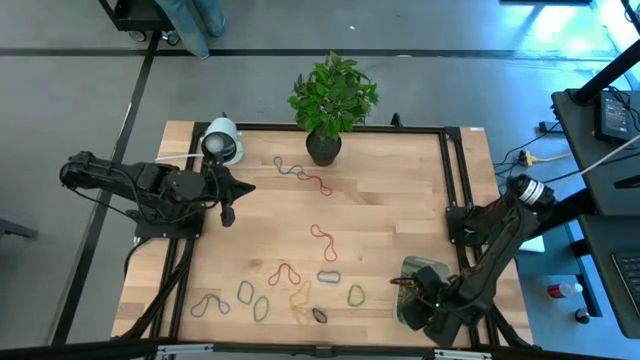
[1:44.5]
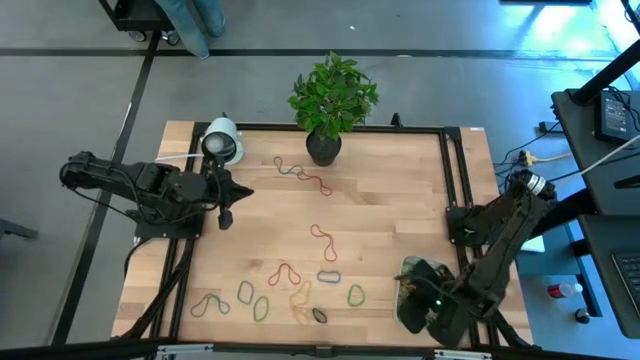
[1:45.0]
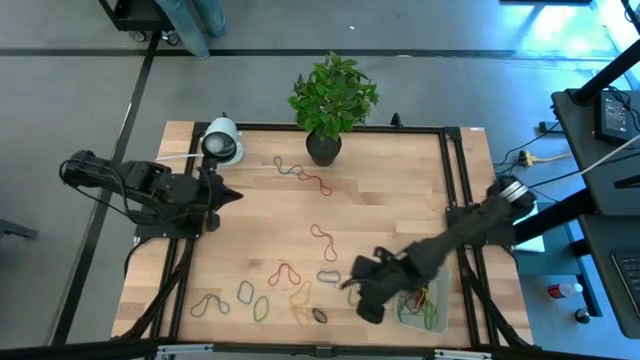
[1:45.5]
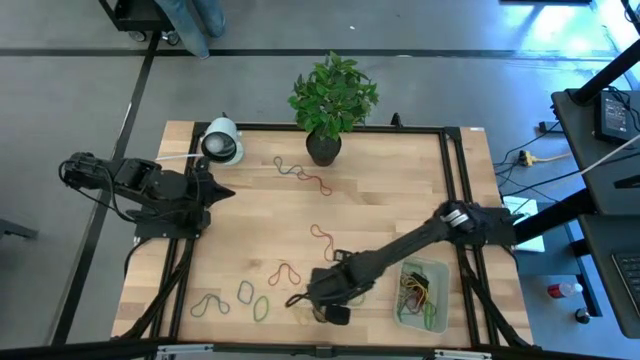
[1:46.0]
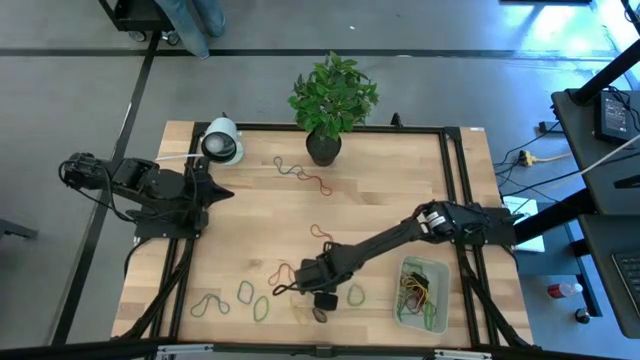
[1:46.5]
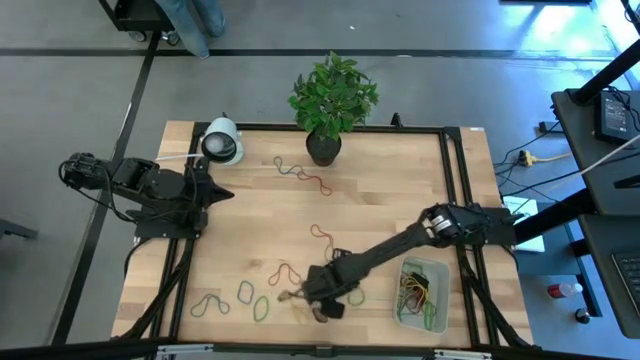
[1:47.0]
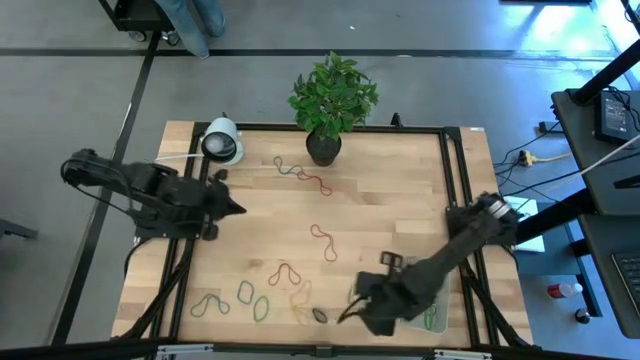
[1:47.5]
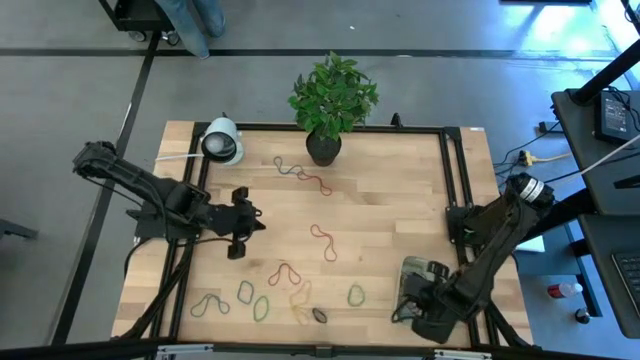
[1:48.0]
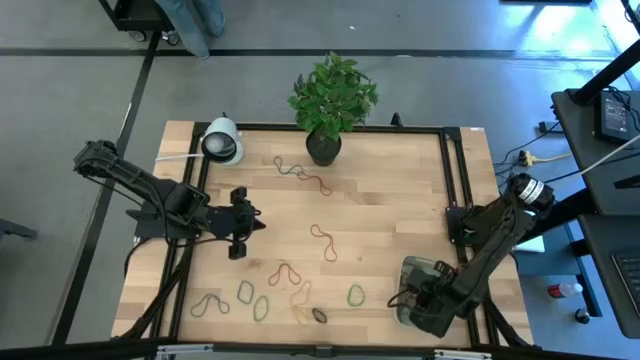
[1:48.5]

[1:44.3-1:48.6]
Task: Pick and place rubber bands into bin
Put the blue rubber band into the gray bin

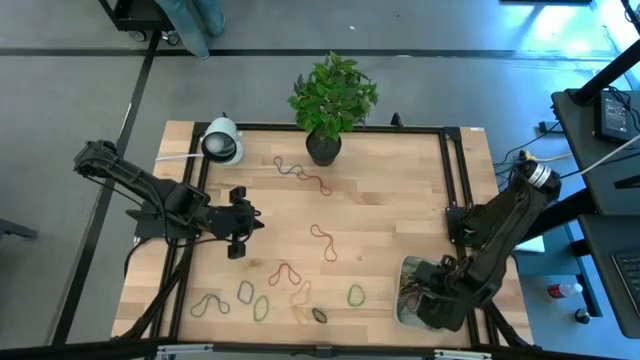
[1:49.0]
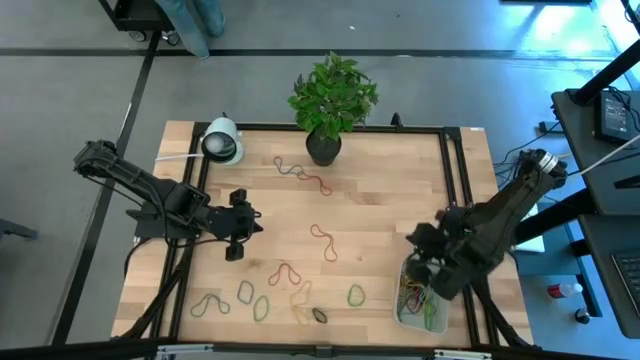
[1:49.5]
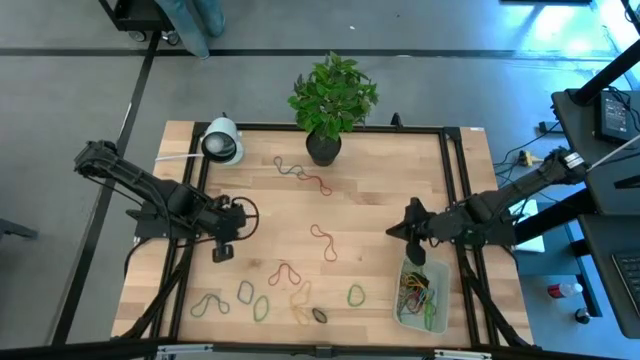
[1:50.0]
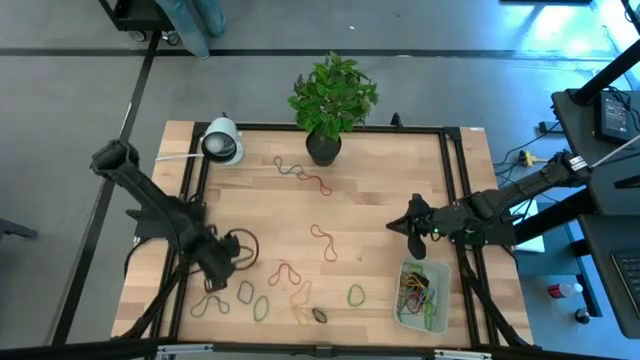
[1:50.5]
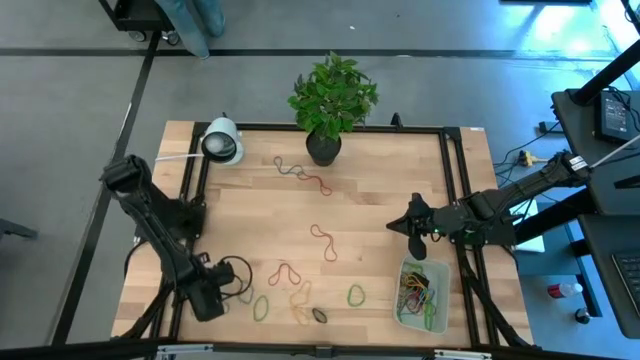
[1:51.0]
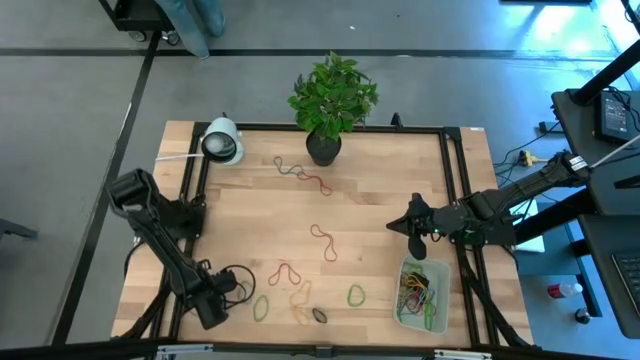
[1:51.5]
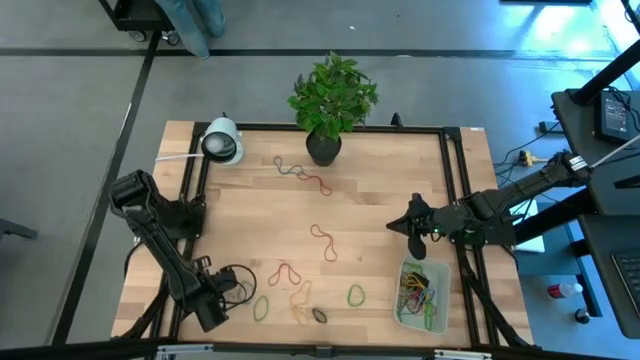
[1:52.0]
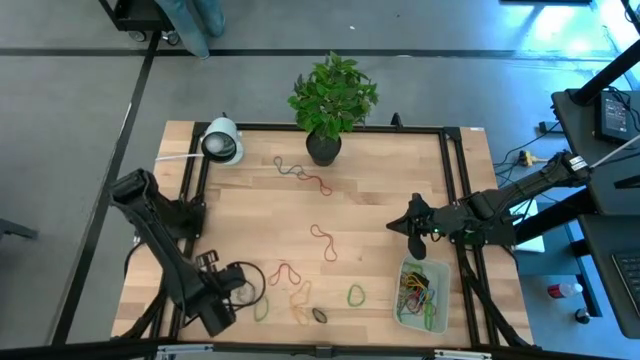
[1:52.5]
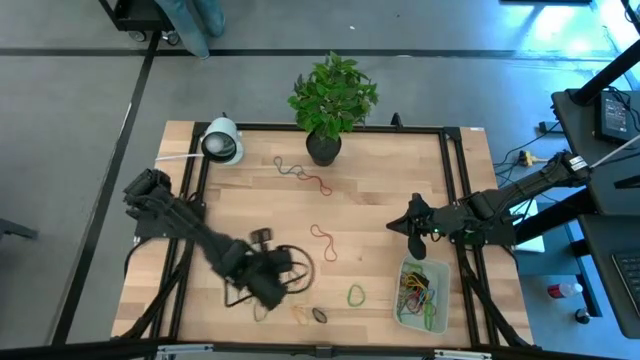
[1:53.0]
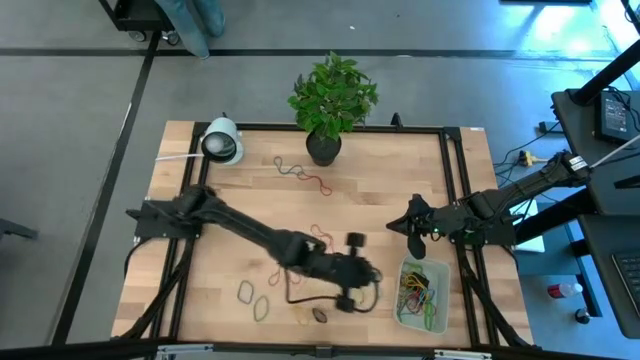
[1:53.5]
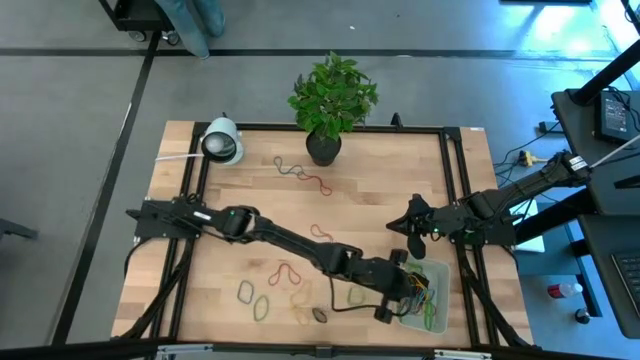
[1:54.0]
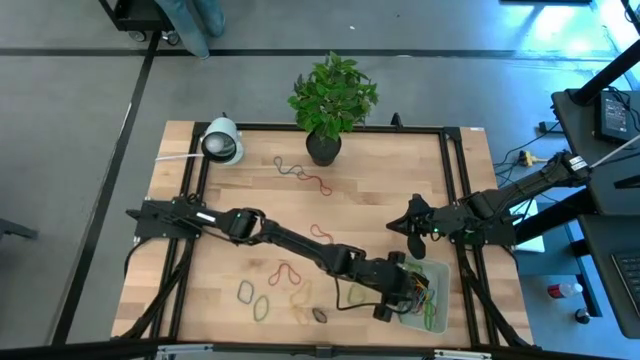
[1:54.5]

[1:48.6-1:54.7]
Put the blue rubber band into the gray bin

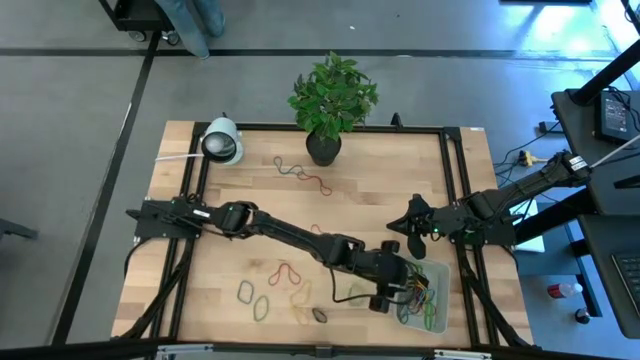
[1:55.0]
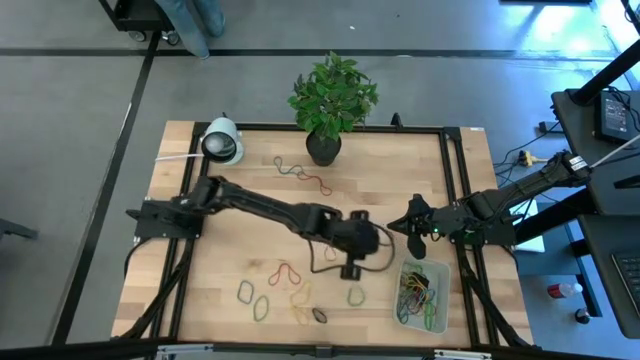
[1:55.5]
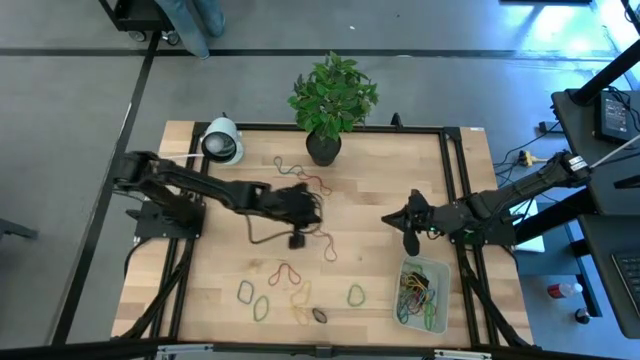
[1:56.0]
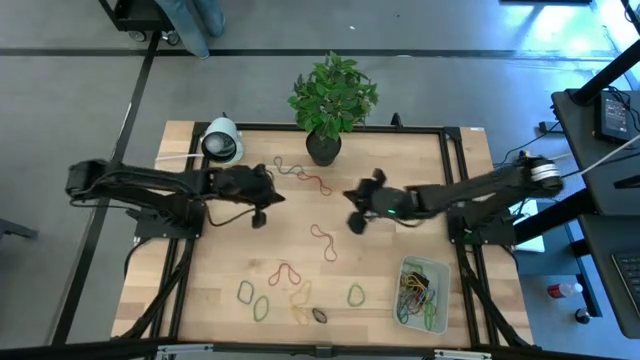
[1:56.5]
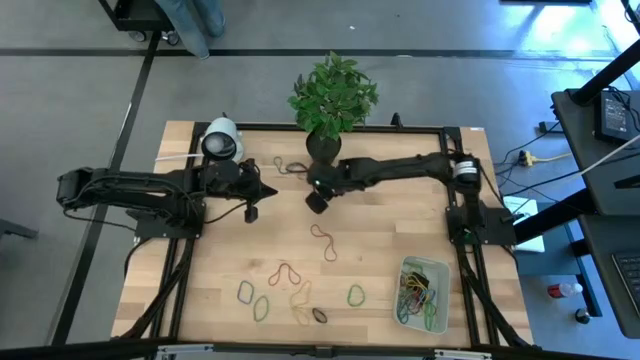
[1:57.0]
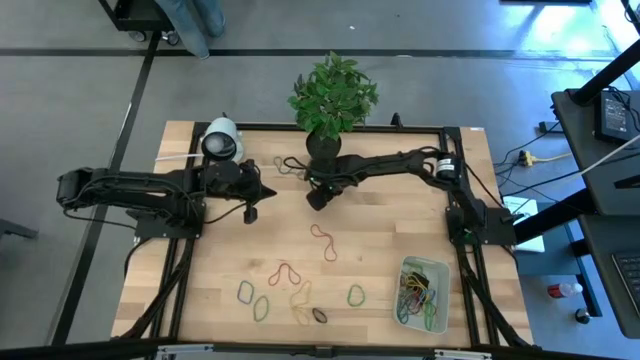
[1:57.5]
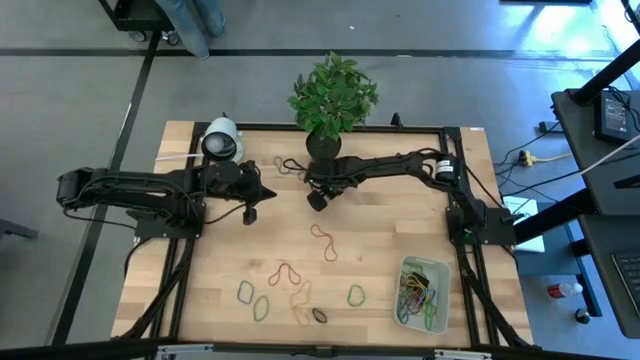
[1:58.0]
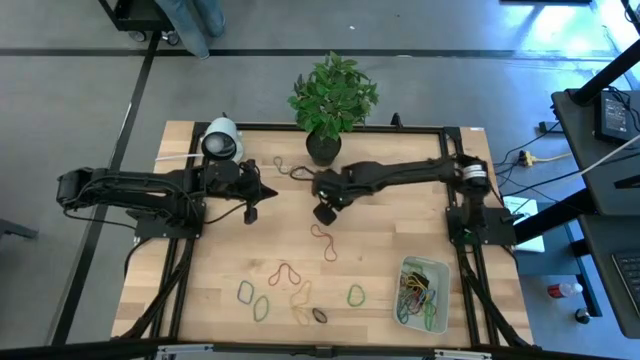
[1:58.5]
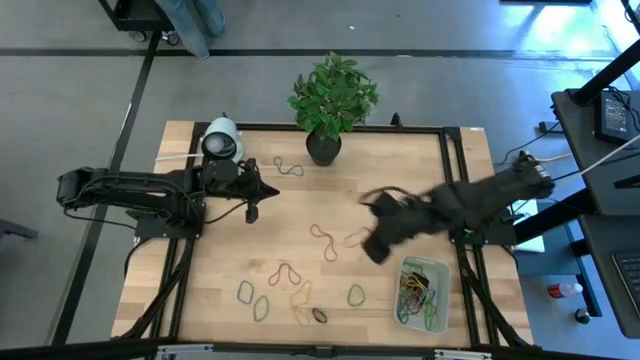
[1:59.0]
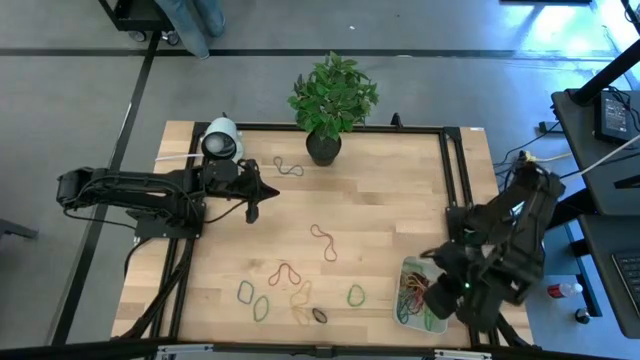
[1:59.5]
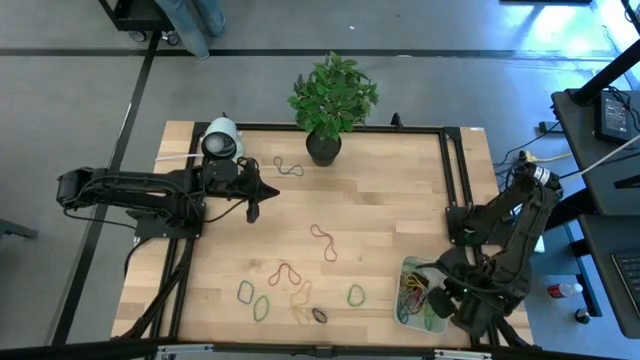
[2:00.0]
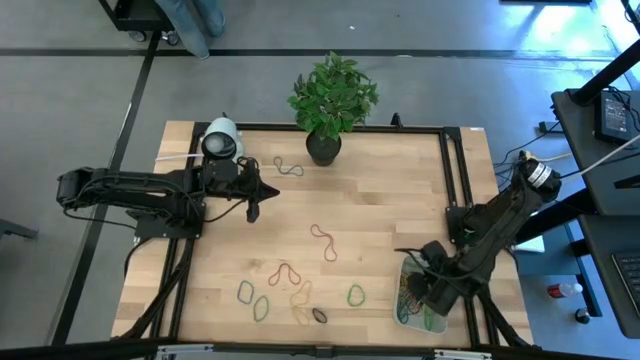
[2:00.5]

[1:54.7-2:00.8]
Put the red rubber band into the gray bin

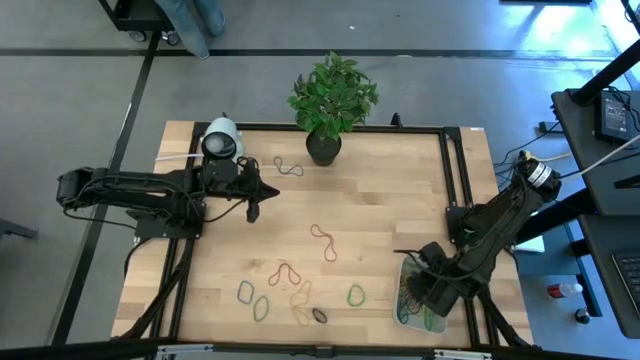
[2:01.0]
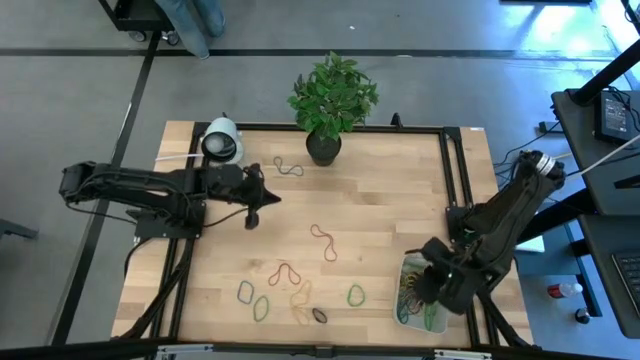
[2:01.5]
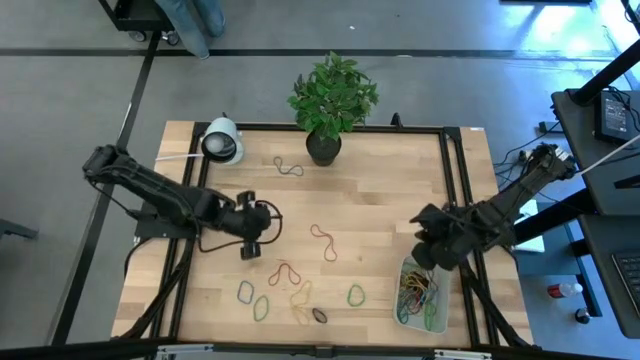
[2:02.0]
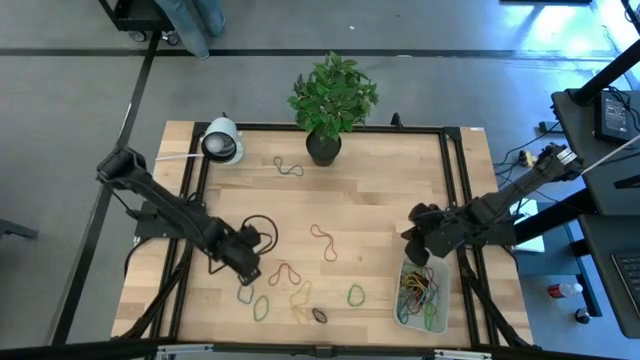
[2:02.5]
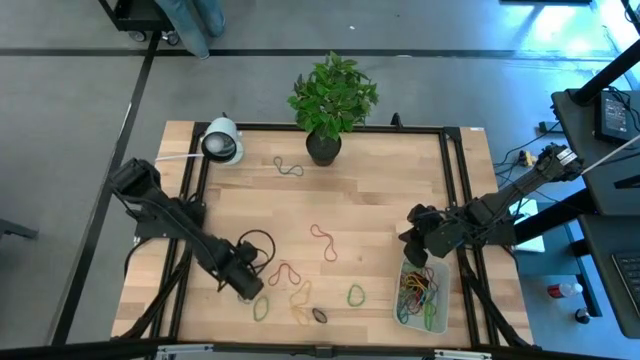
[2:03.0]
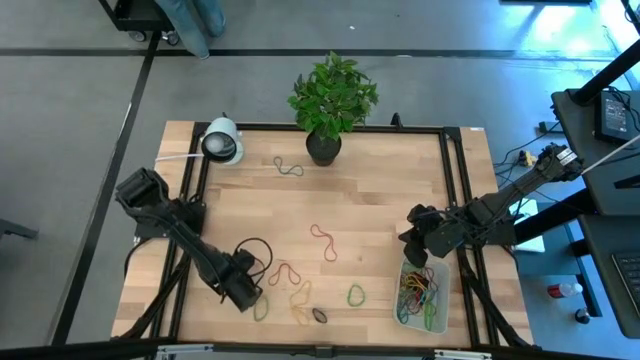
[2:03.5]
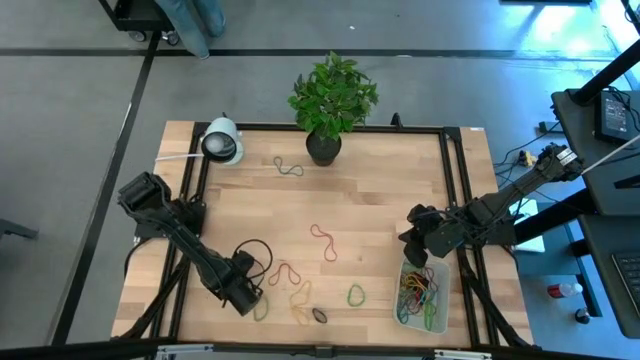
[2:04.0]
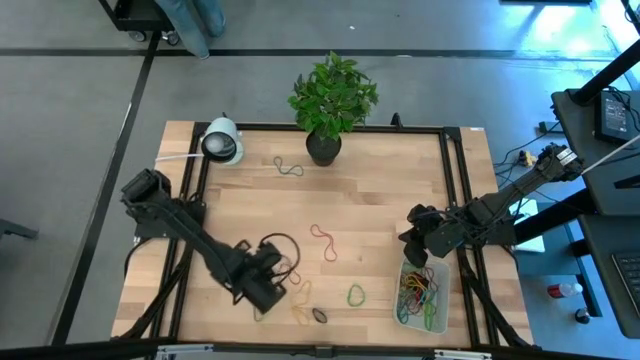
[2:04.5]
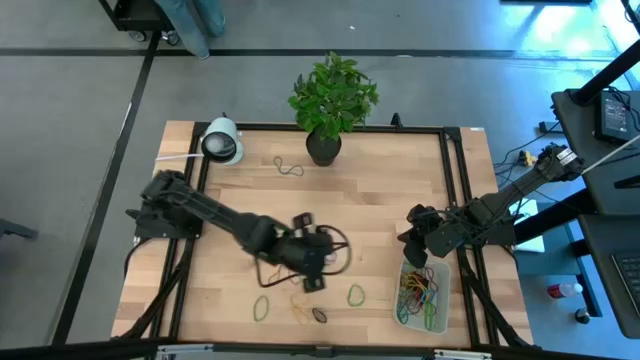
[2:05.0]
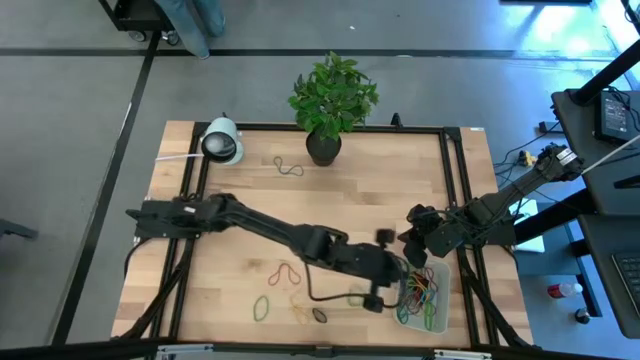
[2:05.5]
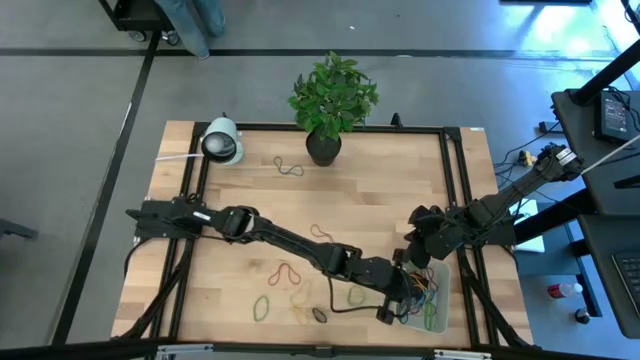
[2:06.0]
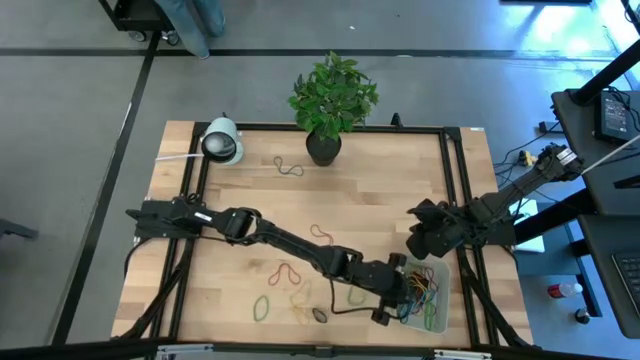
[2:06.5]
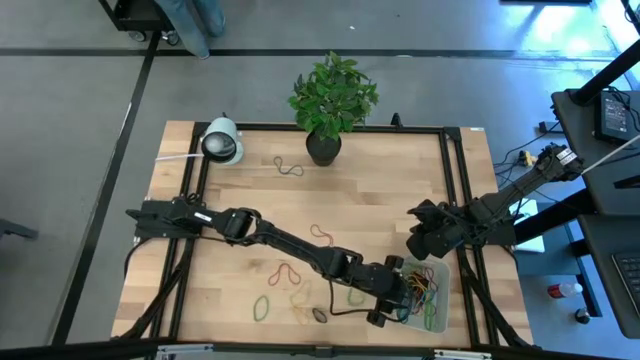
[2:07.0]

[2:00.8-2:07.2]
Put the blue rubber band into the gray bin
